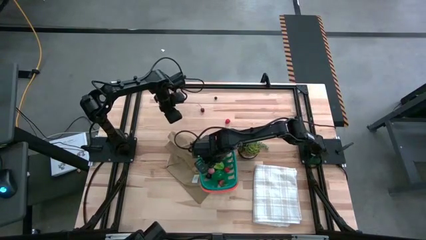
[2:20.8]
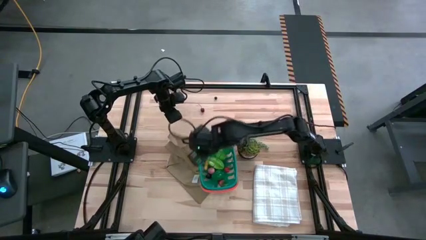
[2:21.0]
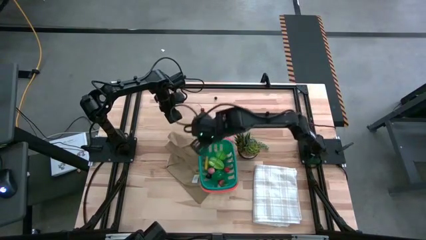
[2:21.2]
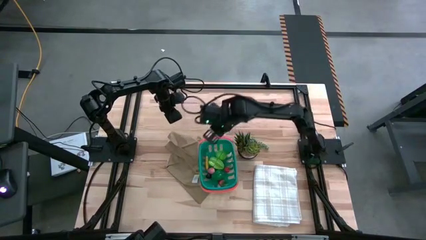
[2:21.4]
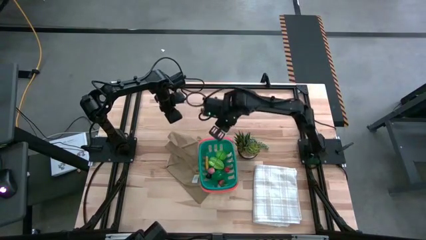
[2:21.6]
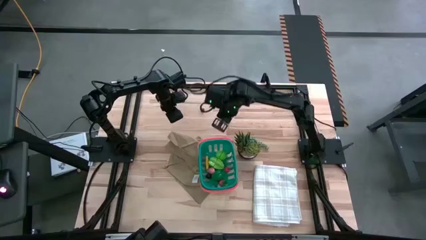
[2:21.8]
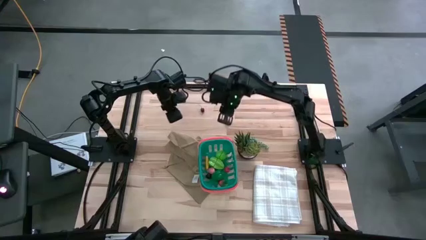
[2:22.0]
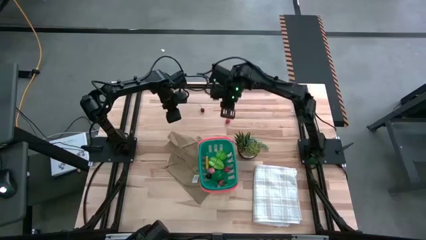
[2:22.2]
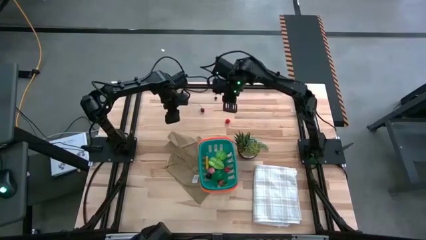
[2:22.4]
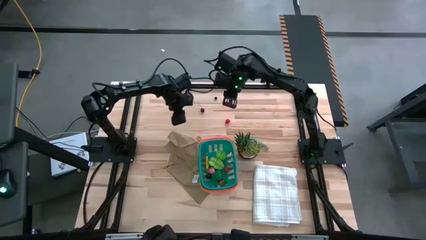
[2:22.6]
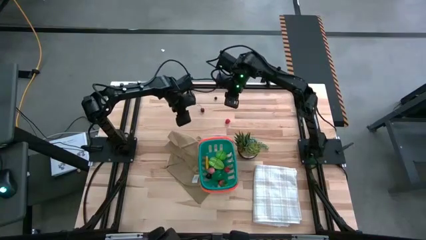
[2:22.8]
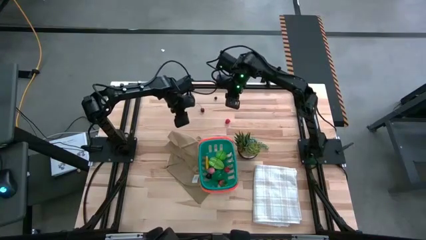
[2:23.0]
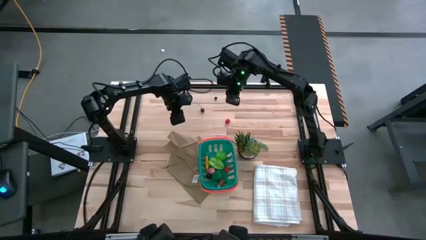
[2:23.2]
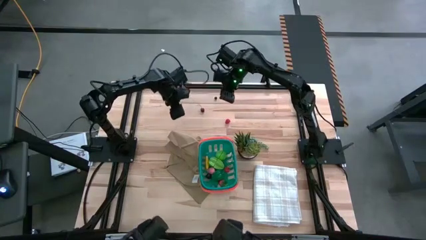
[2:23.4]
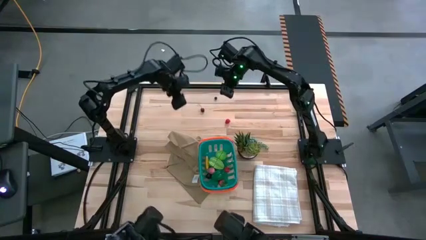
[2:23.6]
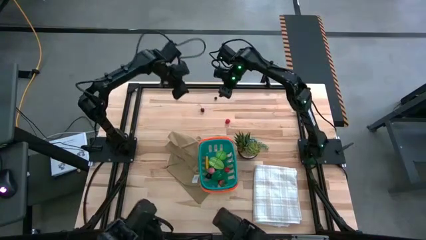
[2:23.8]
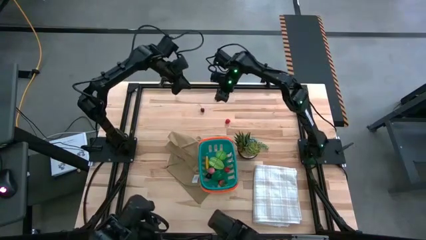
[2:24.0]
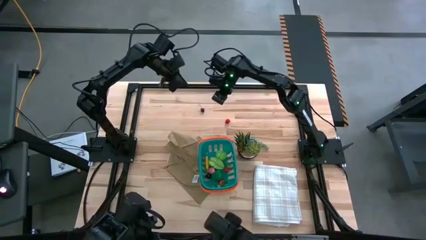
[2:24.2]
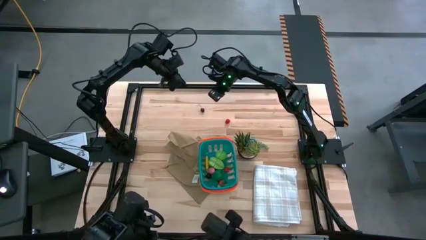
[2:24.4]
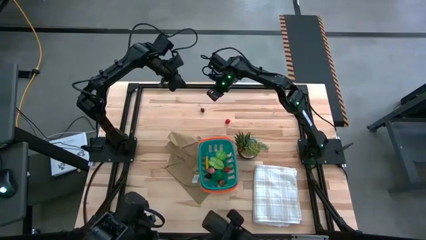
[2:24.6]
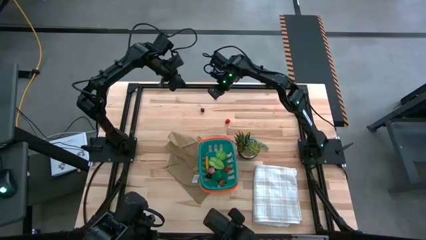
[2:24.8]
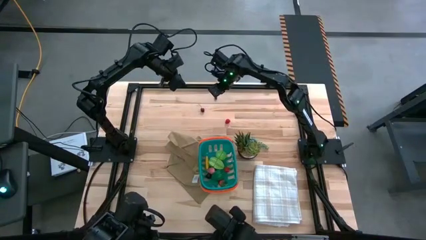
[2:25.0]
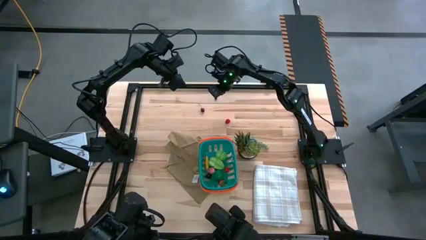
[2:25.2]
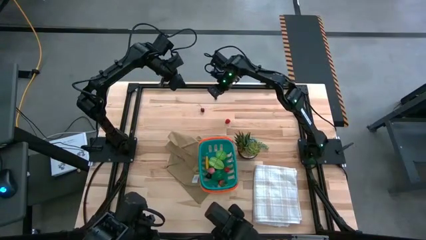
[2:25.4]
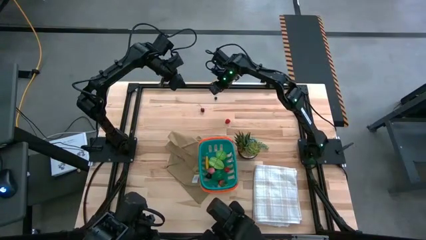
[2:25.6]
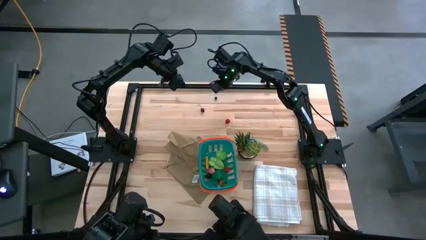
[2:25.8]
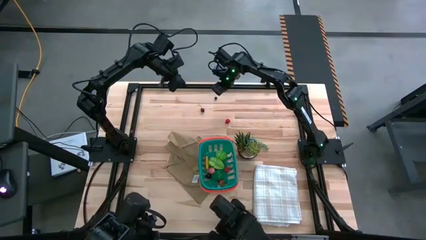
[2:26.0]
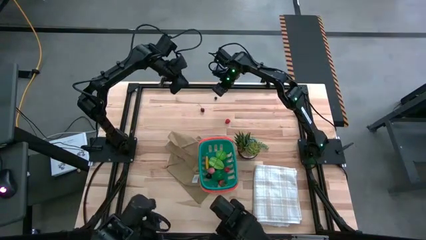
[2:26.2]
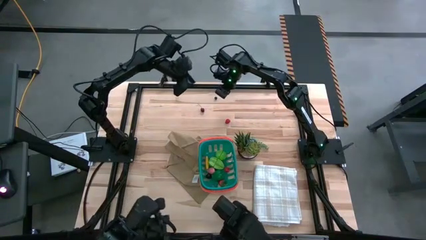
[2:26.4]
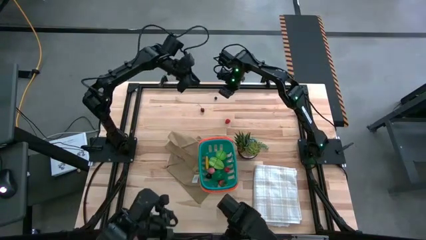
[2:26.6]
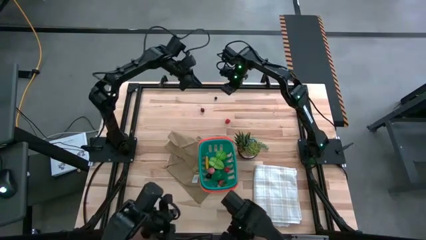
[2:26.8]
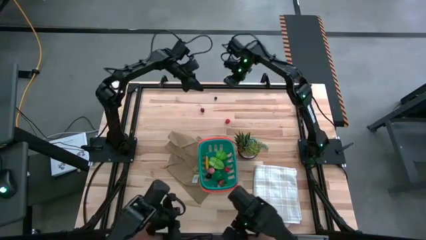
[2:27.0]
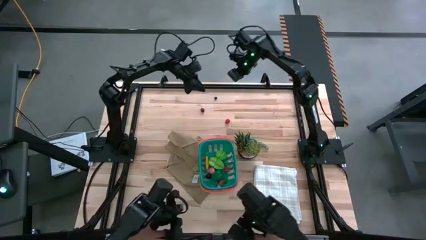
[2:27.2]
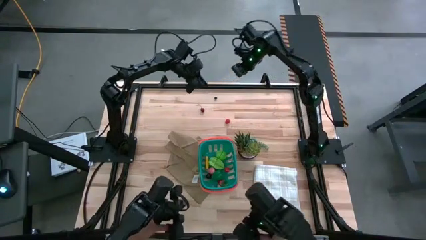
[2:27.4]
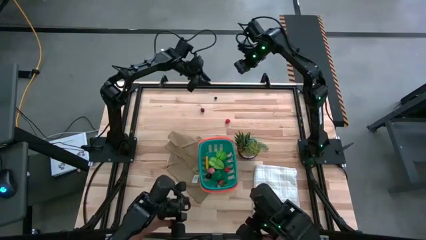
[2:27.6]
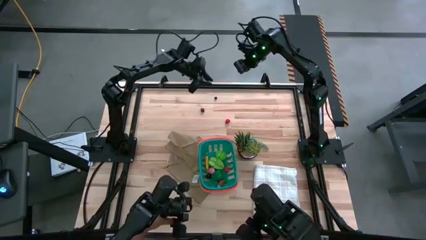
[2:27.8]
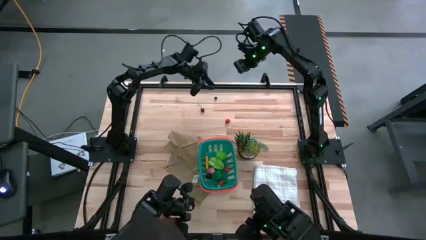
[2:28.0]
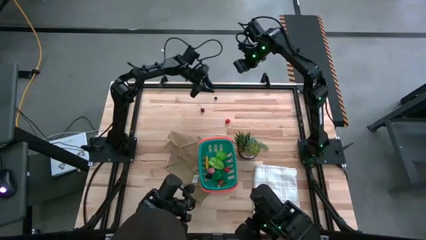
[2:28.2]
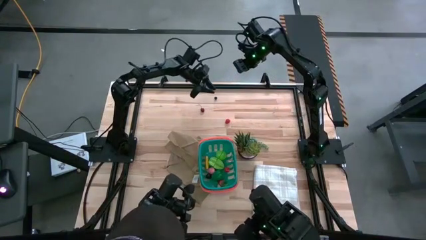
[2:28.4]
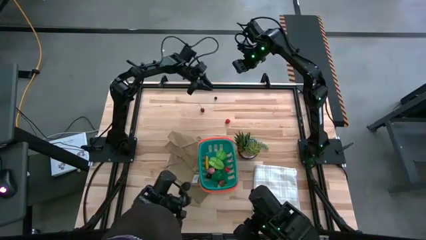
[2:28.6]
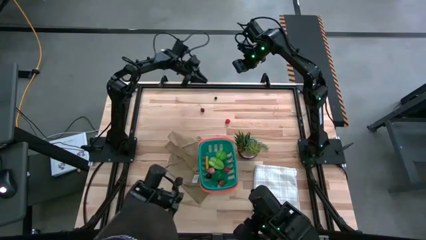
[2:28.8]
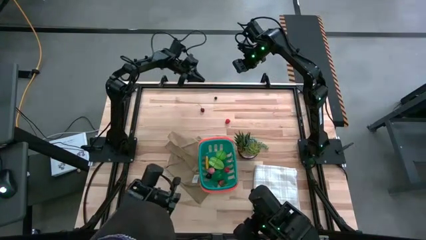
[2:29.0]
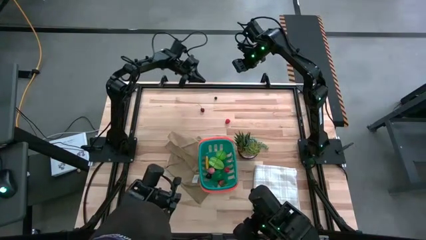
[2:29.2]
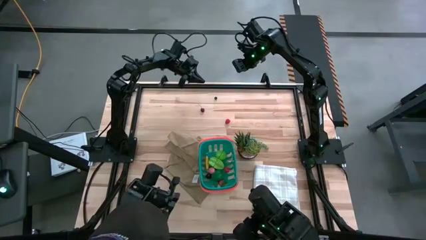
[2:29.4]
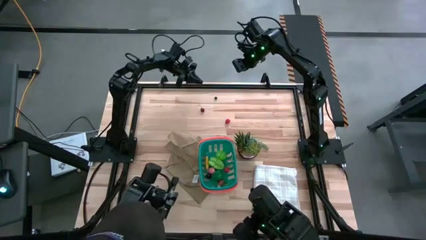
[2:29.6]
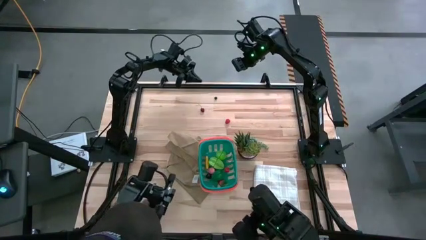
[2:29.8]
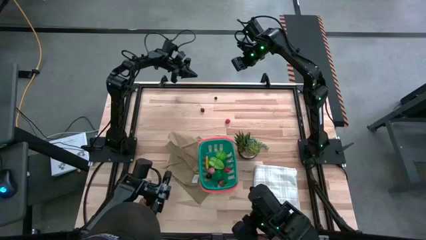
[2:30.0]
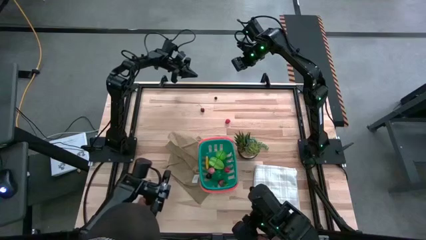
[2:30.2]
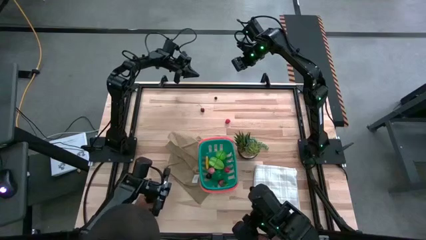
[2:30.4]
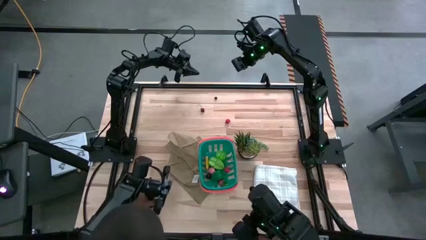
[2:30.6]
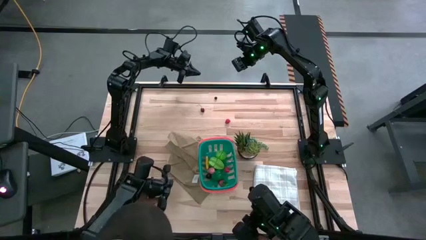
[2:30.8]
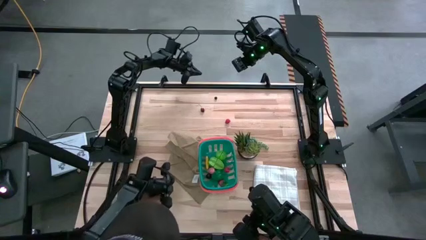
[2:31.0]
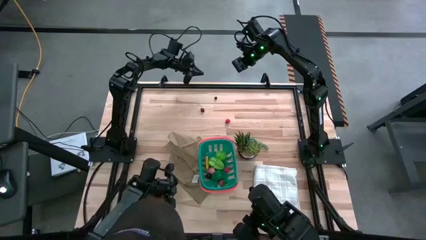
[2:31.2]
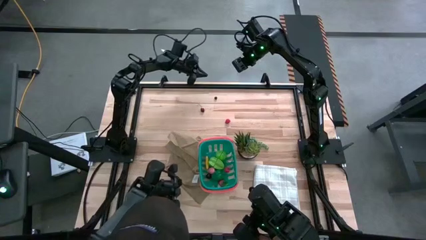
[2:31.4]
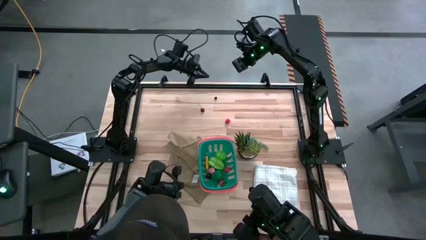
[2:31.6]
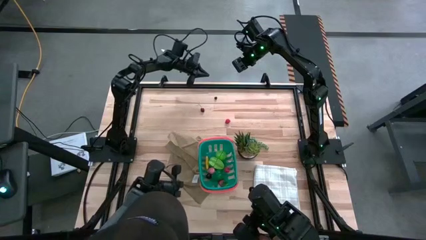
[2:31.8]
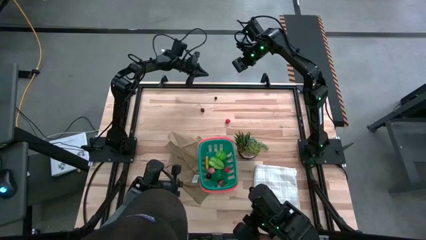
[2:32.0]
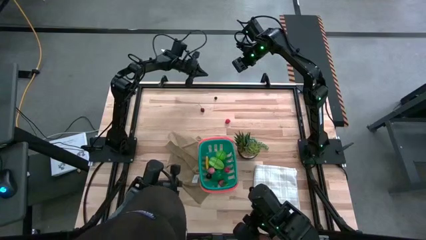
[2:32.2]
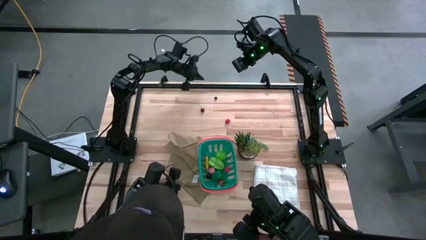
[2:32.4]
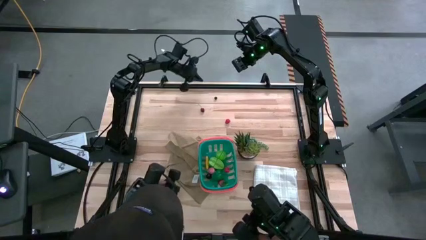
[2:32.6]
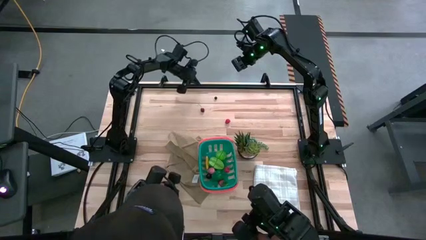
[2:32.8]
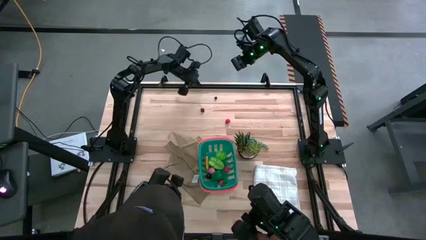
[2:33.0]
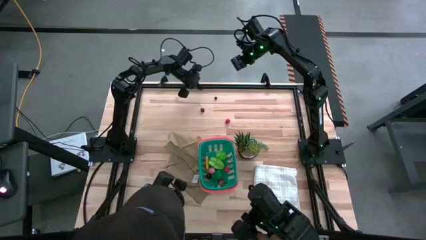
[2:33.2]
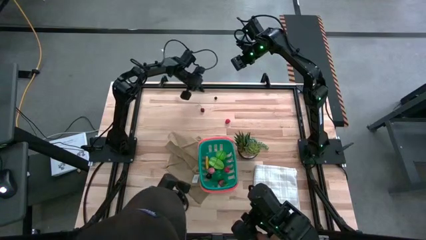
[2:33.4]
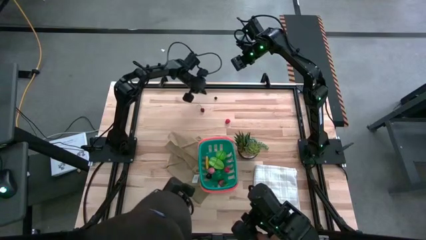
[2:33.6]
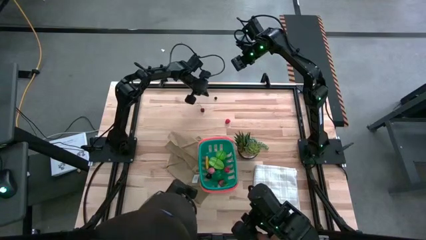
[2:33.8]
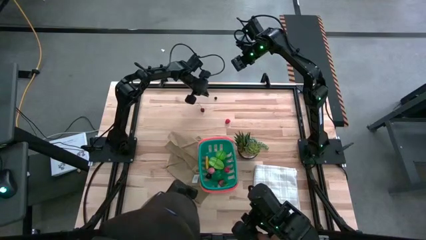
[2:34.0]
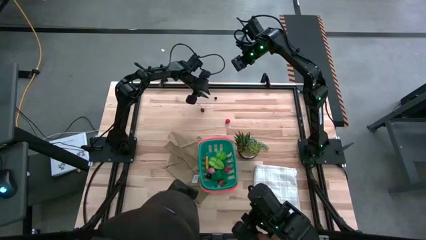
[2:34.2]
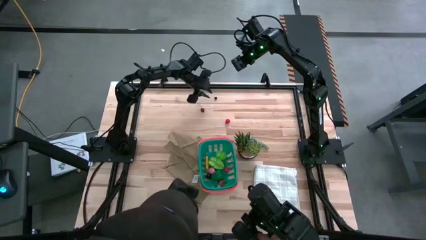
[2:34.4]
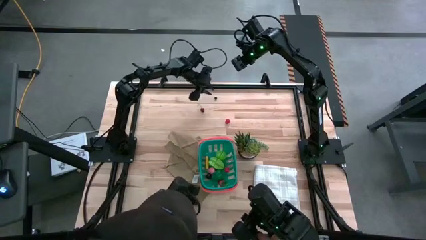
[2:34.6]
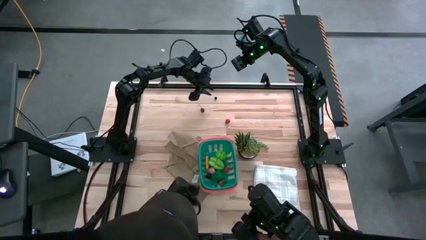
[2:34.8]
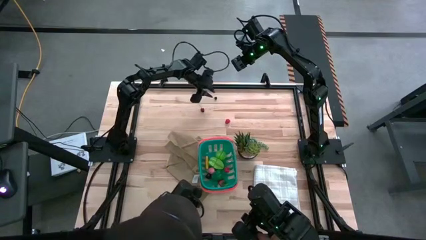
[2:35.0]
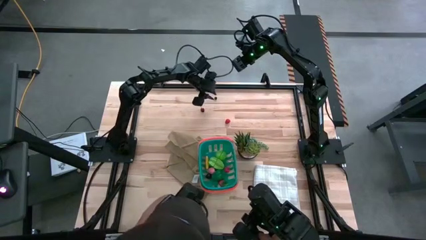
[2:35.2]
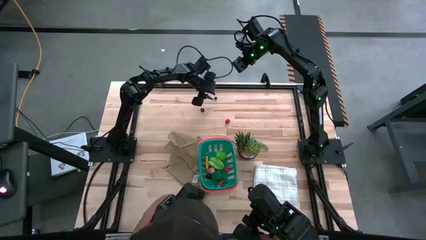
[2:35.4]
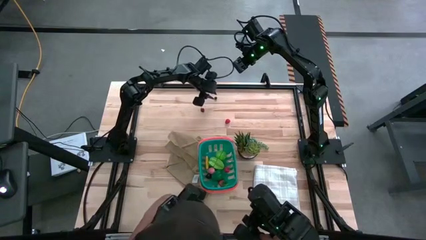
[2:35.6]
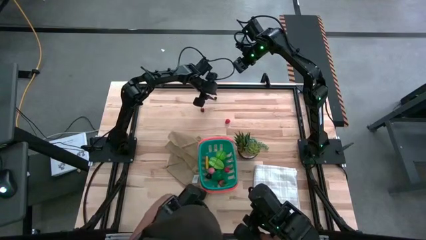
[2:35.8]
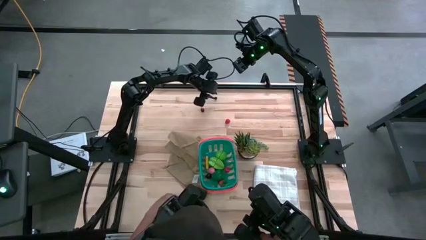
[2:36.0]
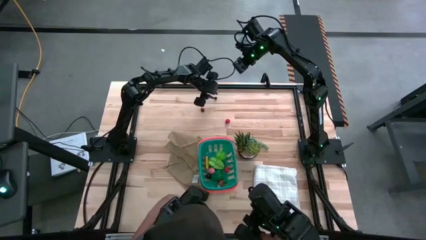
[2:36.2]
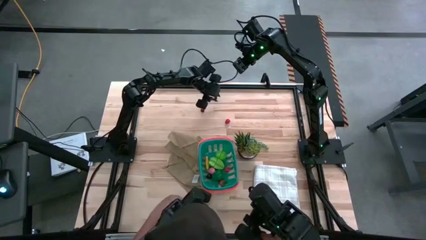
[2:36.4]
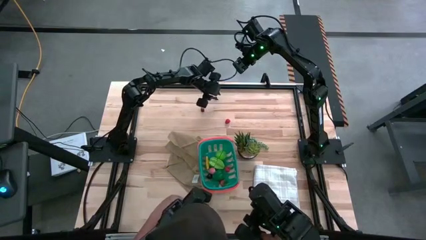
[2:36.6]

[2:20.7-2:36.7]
Task: Pick and placing Produce into tupperware
Put the blueberry into the green basket
